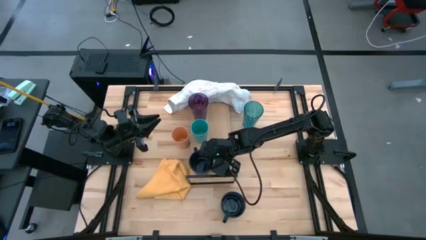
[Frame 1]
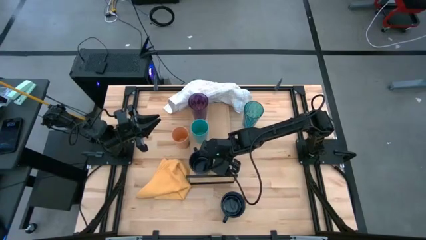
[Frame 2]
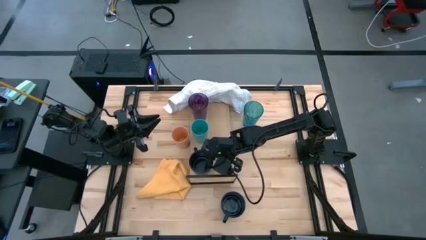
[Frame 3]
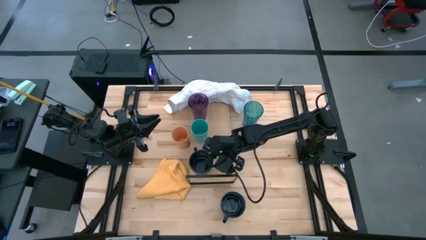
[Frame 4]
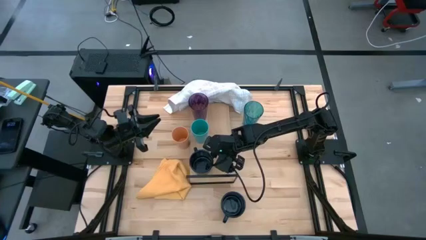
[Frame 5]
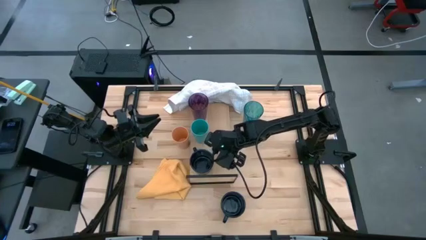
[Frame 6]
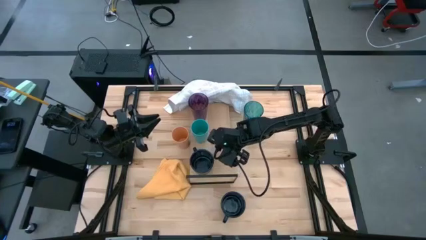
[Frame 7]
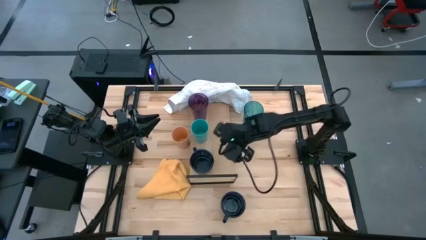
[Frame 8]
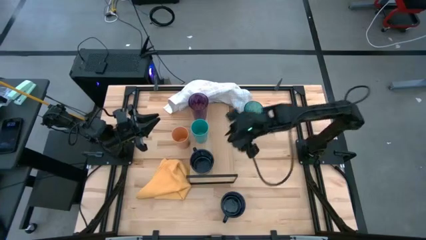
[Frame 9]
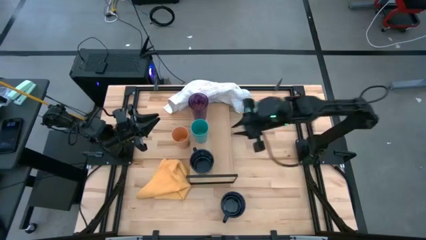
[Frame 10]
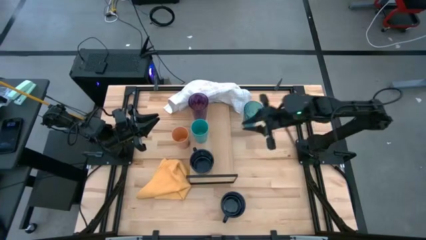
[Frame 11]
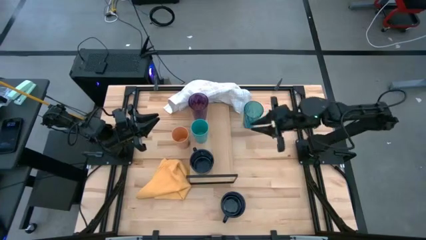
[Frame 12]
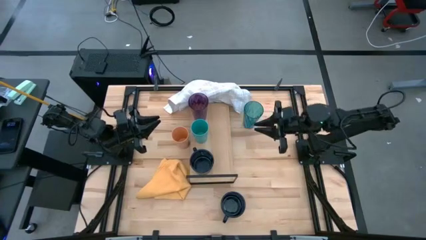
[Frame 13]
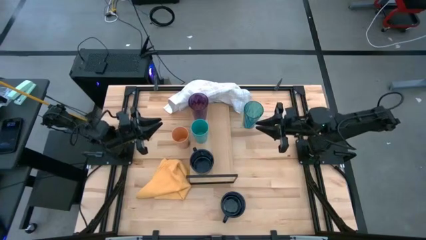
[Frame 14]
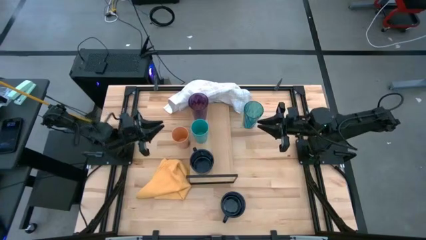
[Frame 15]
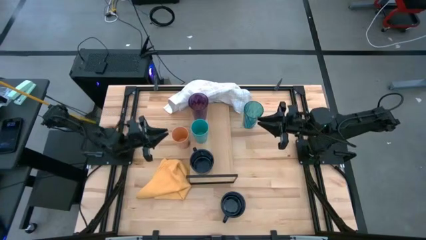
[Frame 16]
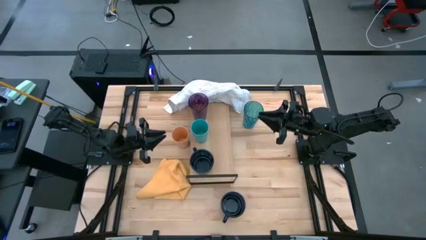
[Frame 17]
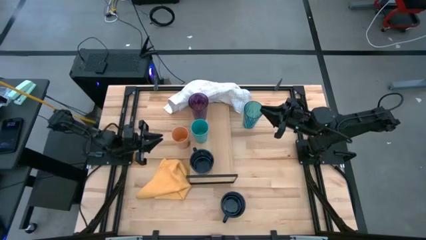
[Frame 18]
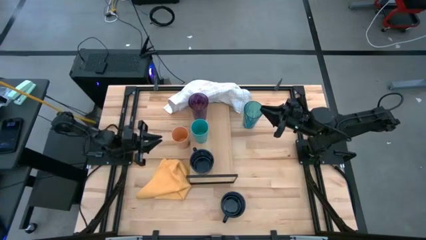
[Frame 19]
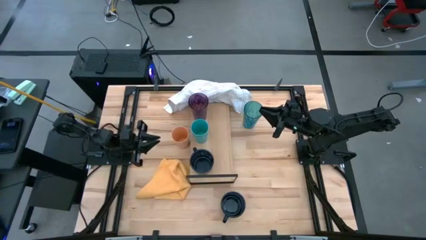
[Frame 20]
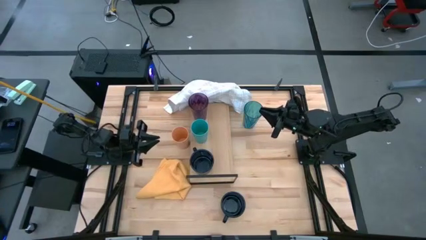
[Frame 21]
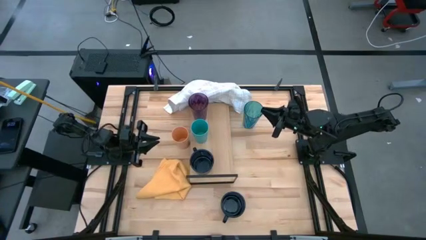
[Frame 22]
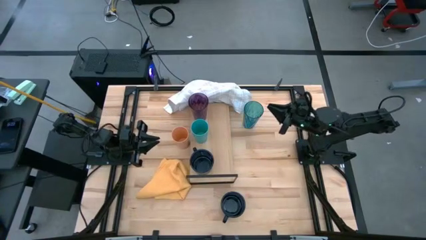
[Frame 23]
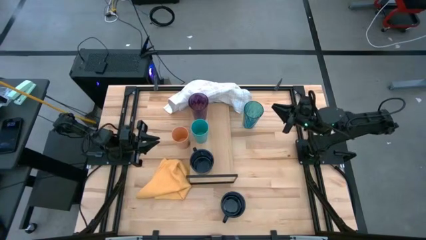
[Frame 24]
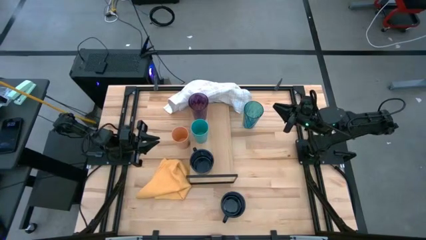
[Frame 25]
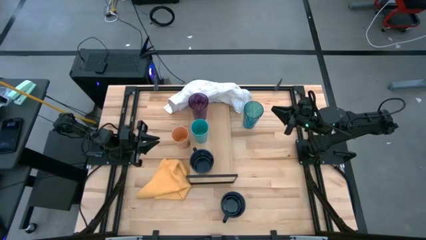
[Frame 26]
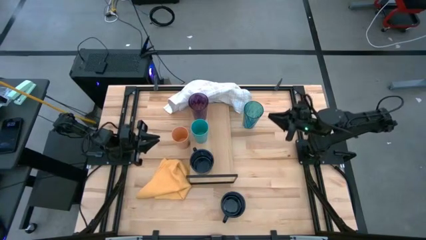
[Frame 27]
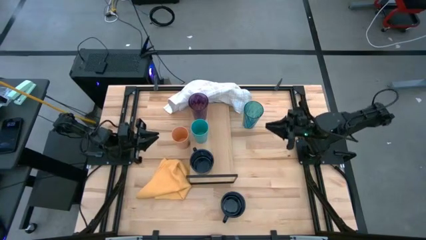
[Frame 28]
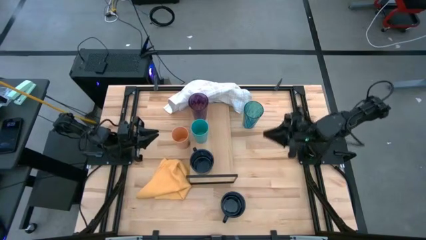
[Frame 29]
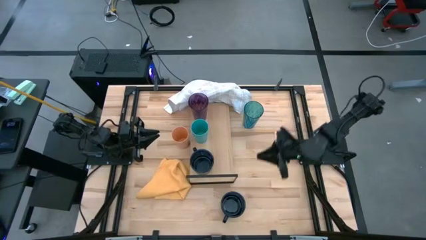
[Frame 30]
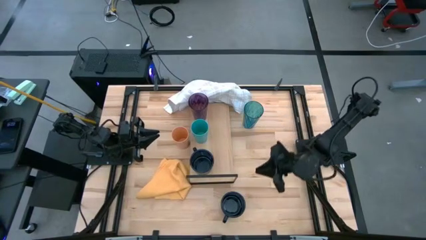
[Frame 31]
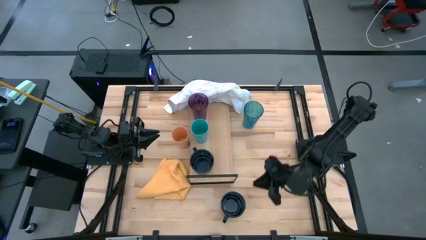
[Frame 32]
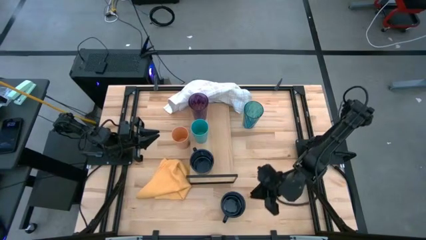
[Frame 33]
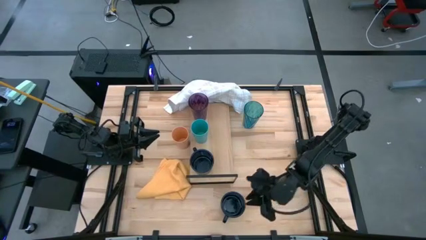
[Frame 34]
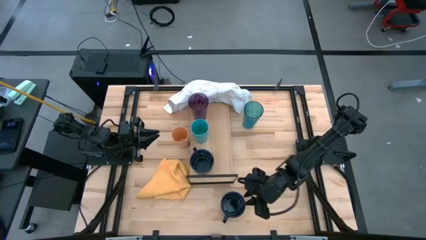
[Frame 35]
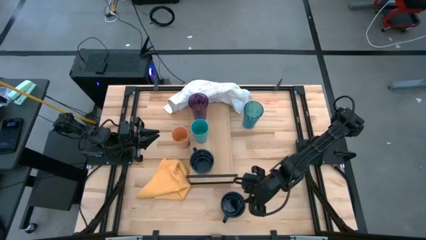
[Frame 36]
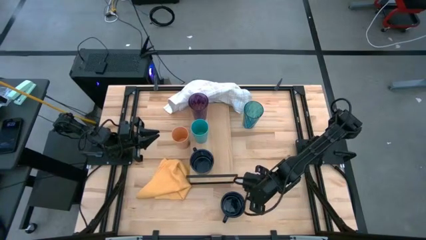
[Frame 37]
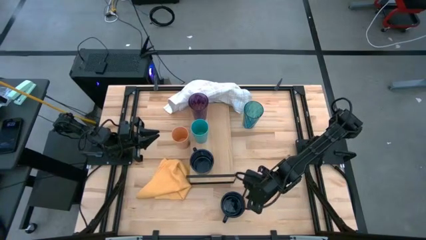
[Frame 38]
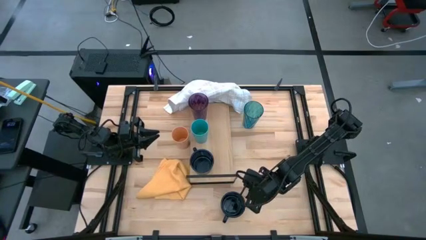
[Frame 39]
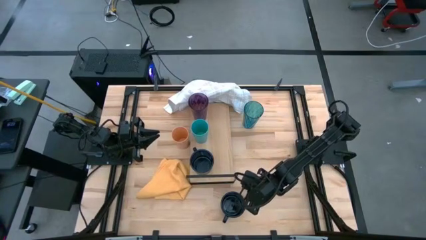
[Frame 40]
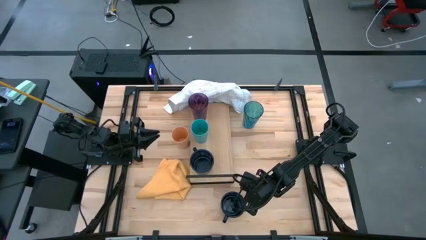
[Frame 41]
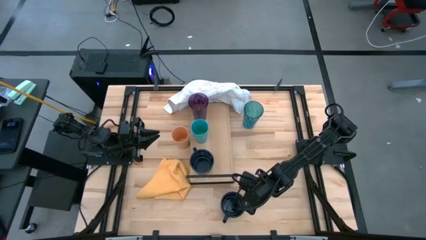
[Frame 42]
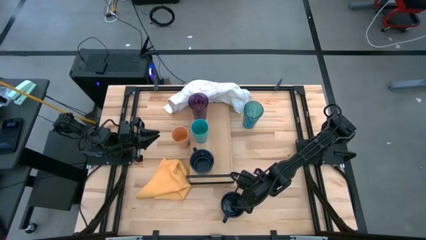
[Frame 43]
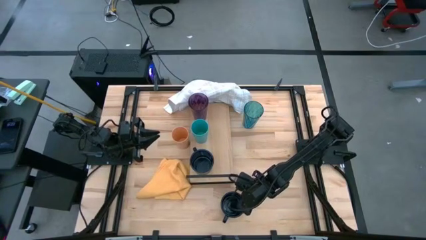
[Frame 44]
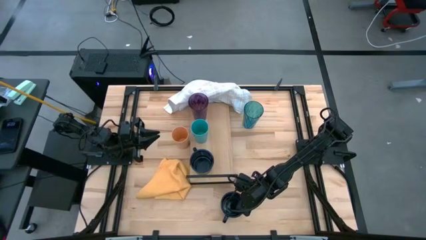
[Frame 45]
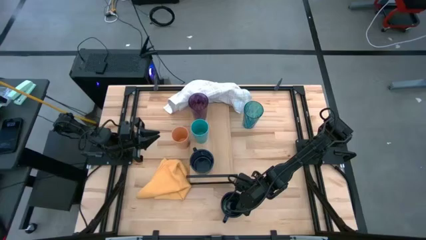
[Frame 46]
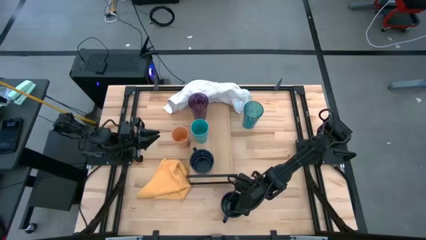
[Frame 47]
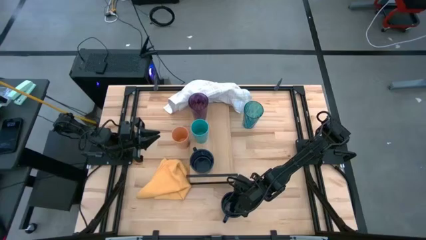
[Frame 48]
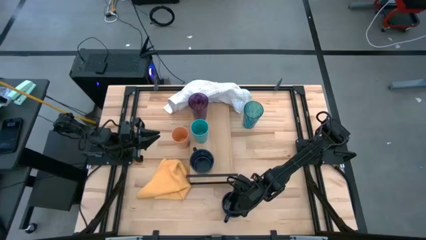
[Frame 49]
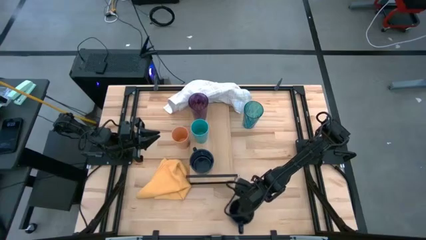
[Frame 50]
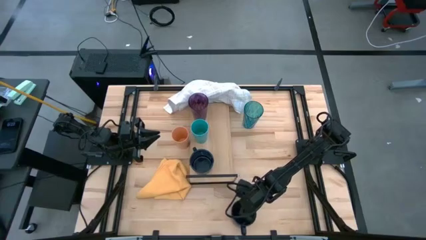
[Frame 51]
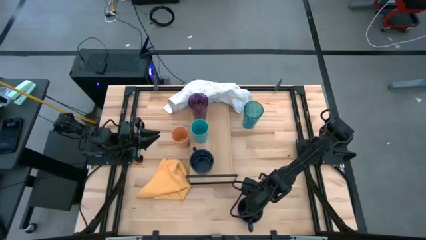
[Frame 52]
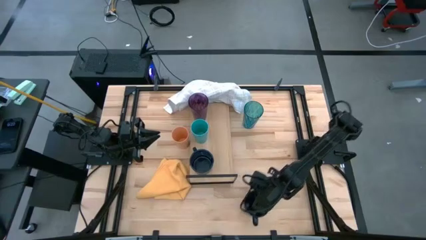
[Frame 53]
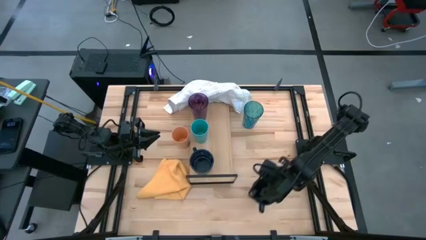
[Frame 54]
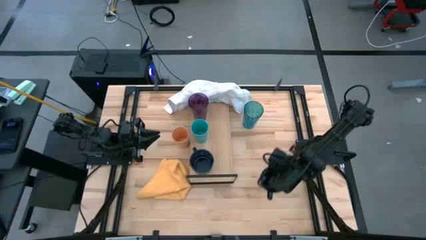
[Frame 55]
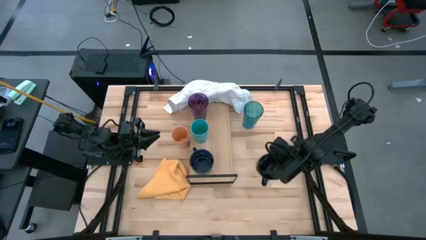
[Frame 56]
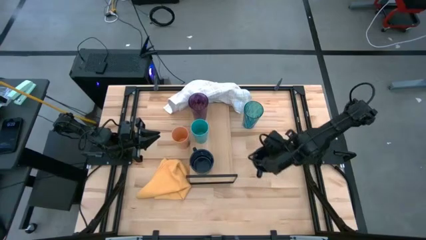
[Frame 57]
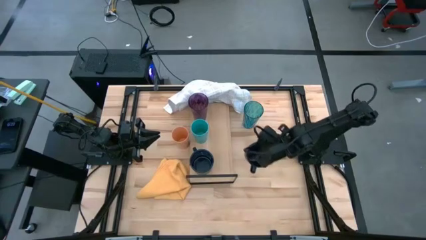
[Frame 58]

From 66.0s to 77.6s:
Task: Stack small to large cups/mugs on shelf
Align the black mug with the other black mug on the shelf

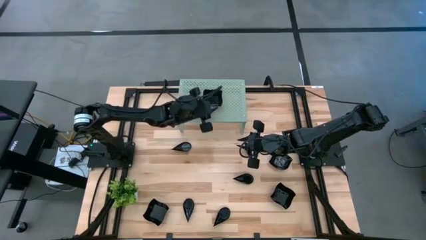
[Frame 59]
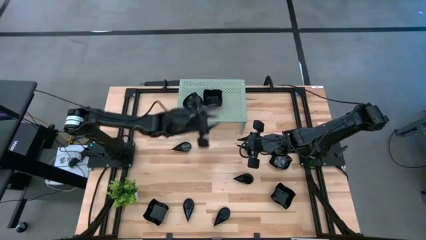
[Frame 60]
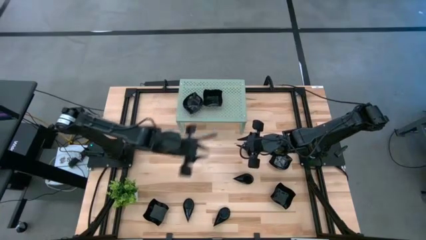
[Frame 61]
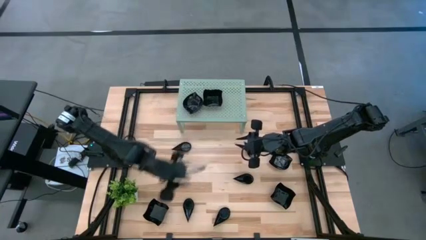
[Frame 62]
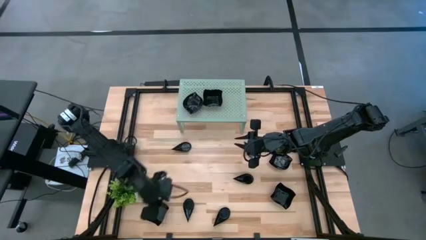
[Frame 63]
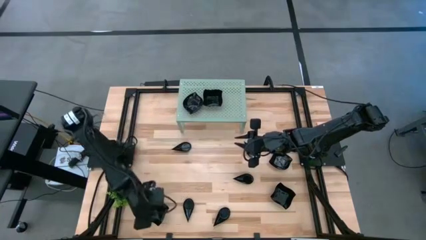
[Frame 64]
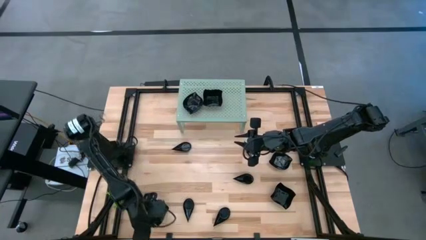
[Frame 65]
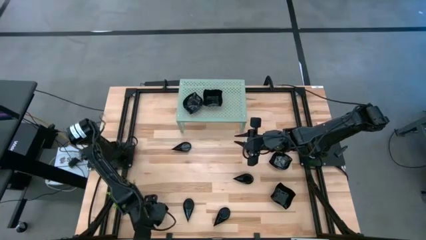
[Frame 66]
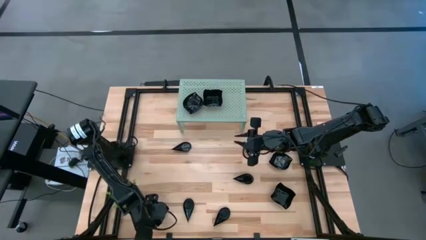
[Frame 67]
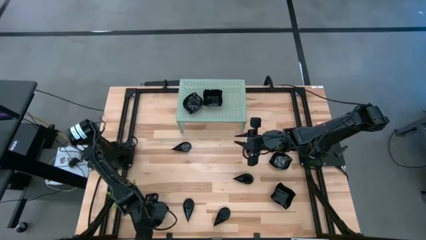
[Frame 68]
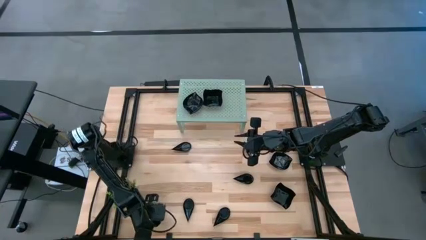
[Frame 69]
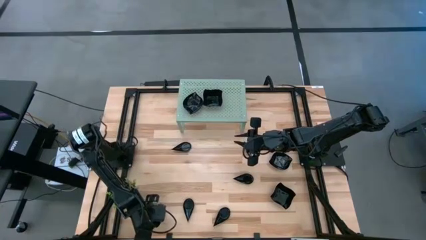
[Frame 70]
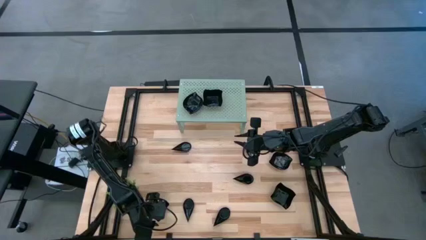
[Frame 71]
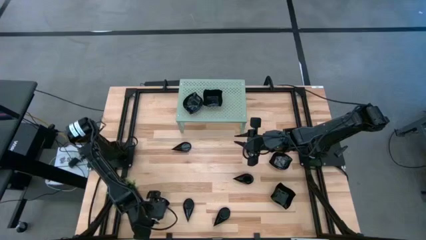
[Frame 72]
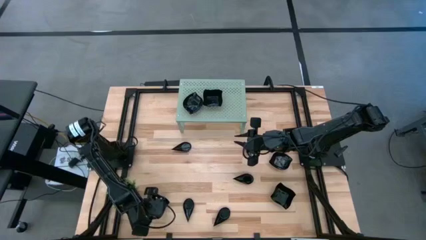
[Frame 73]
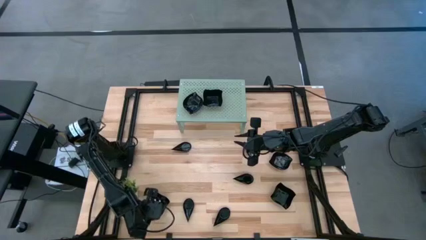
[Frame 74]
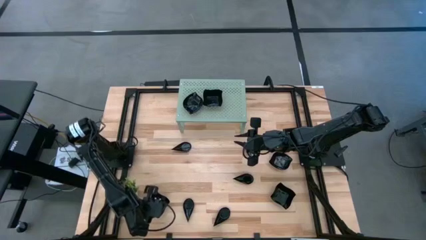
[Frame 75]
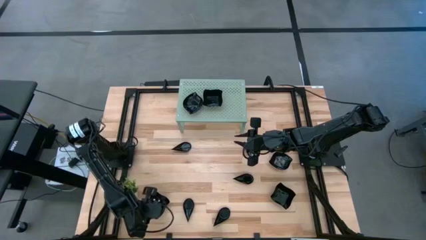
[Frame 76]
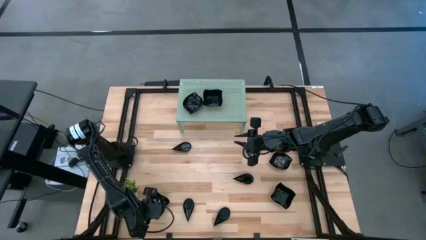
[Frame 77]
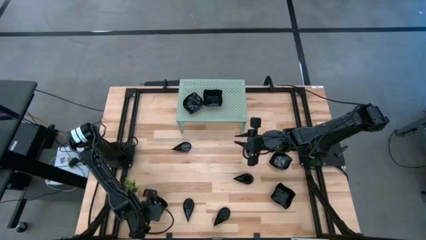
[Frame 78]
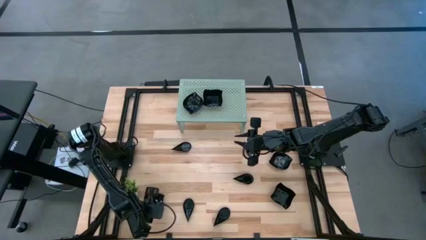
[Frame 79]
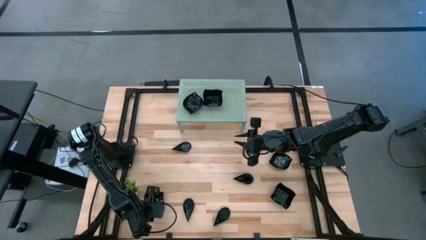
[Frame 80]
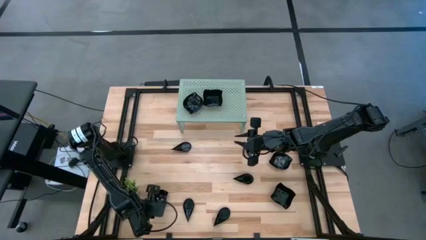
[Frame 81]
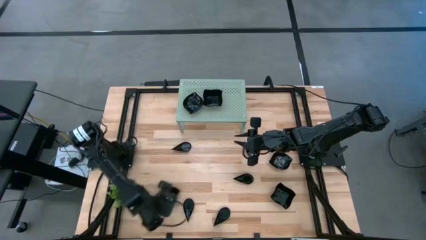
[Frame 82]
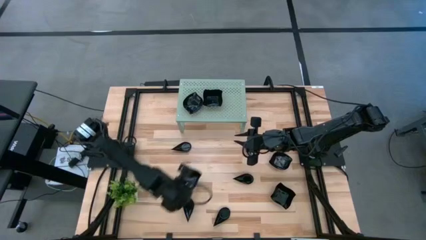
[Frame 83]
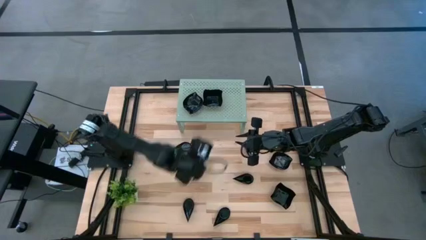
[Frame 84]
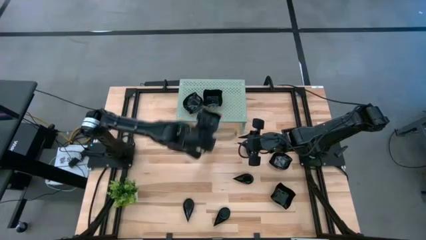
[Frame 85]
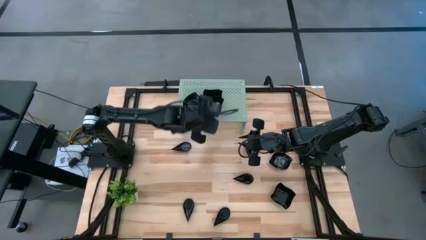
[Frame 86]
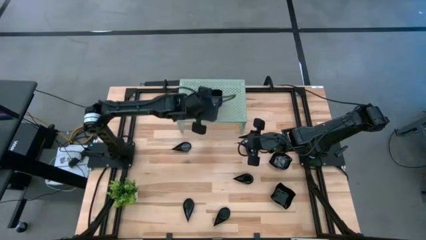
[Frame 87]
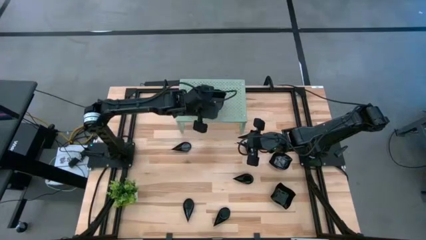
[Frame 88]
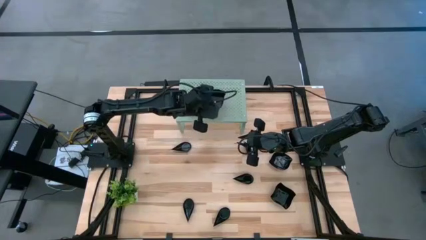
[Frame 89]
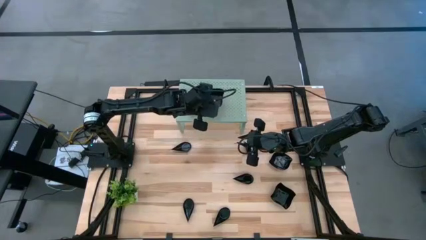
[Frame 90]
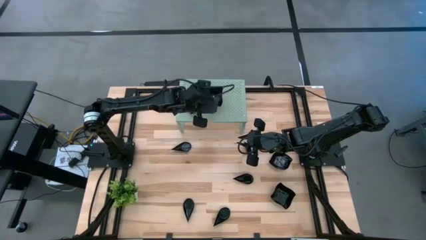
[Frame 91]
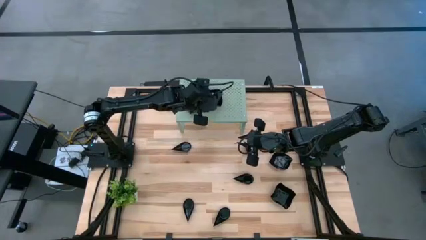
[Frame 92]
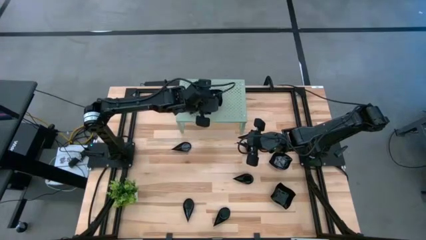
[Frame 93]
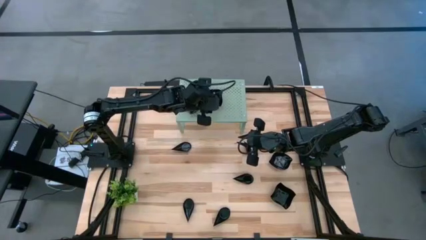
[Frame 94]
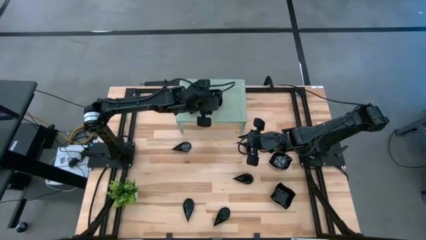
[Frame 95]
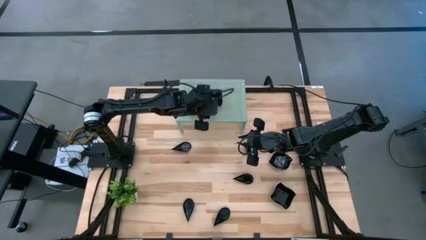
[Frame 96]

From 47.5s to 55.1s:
Task: Pick & Place Mini shaped plates
Stack the distorted square plate on top of the other distorted square plate on the shelf
